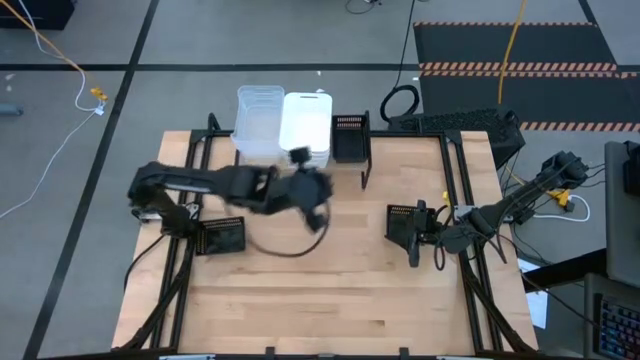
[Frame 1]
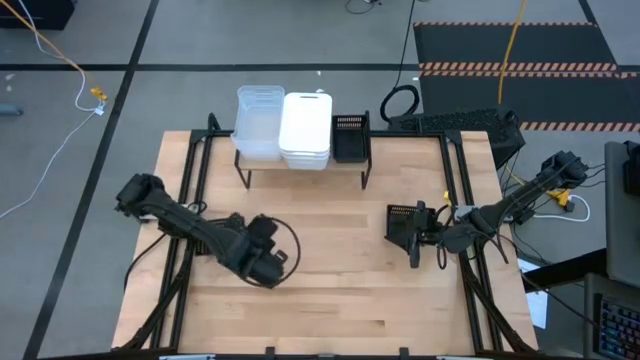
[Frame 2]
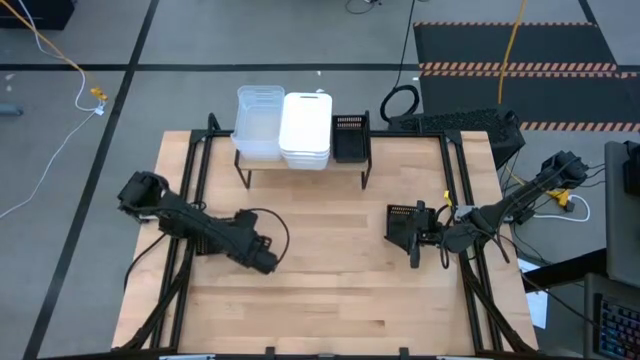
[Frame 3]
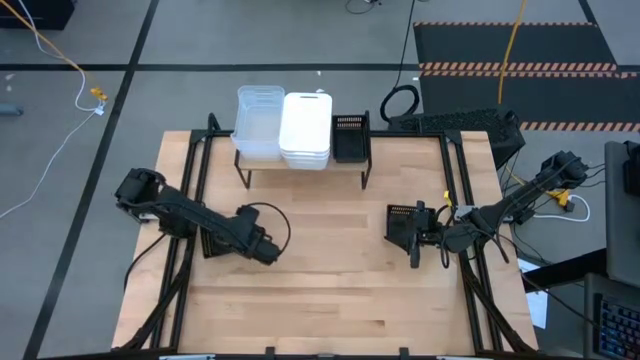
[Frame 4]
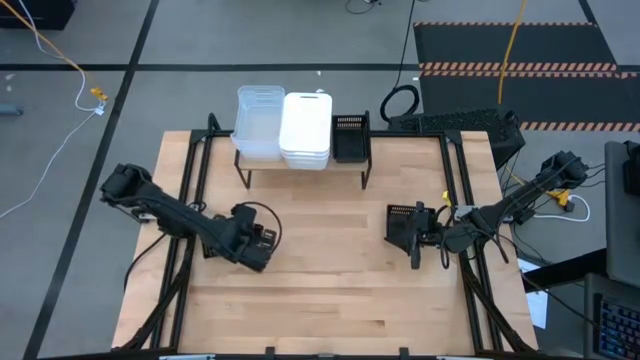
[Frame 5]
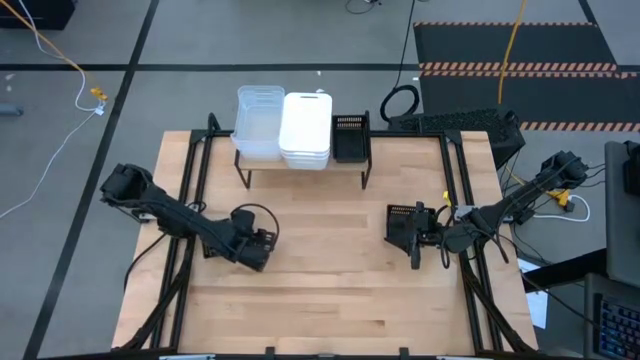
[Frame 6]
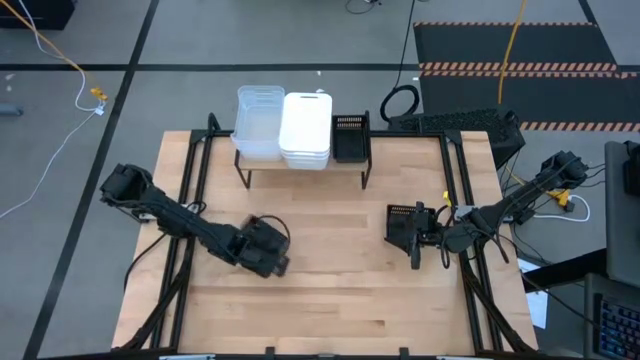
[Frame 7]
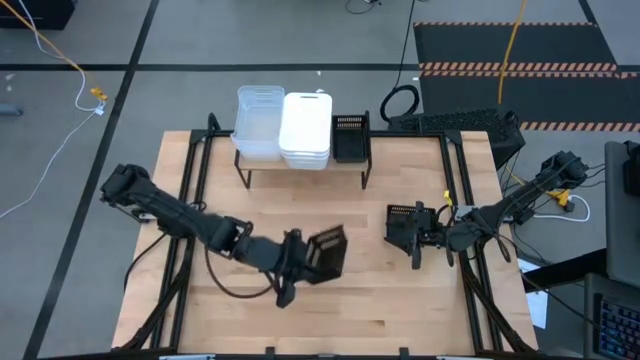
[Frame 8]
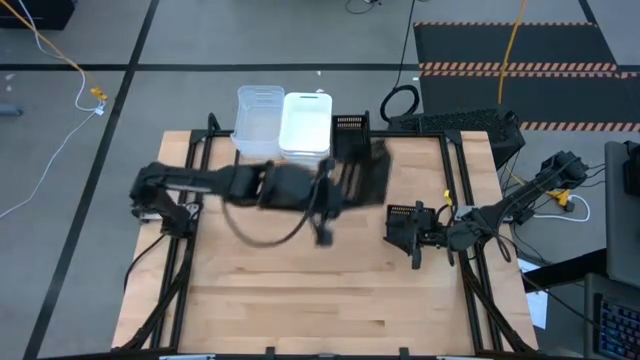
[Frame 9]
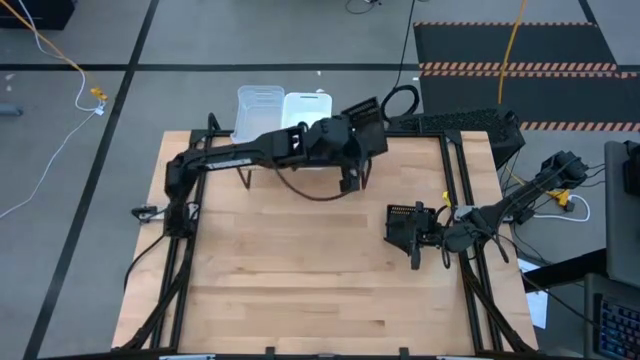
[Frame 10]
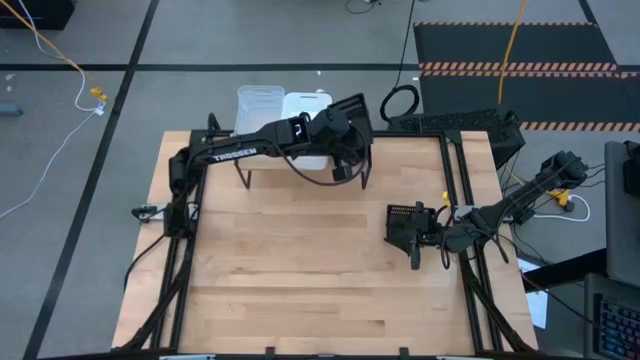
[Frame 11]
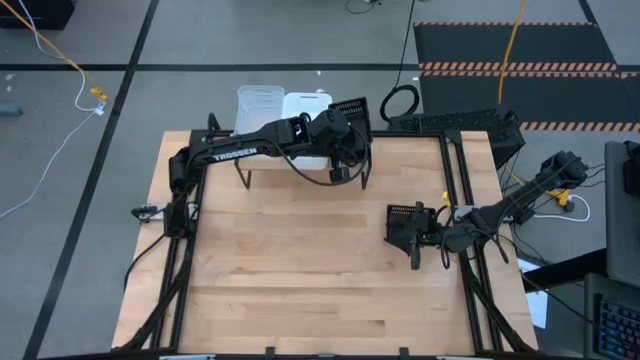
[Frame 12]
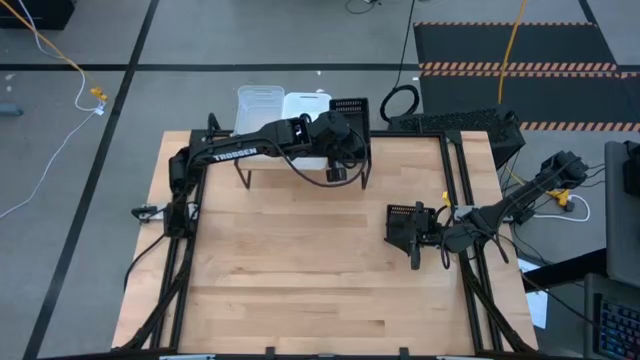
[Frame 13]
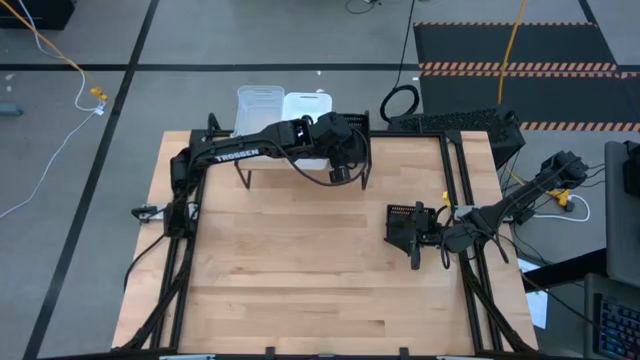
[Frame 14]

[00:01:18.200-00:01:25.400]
Task: Stack baskets on shelf by color
Stack the left black bin on top of the black bin on the shelf

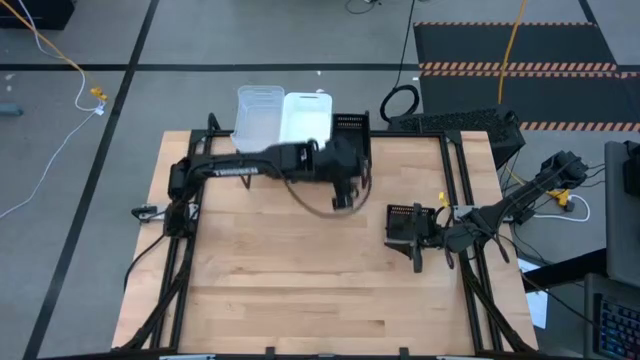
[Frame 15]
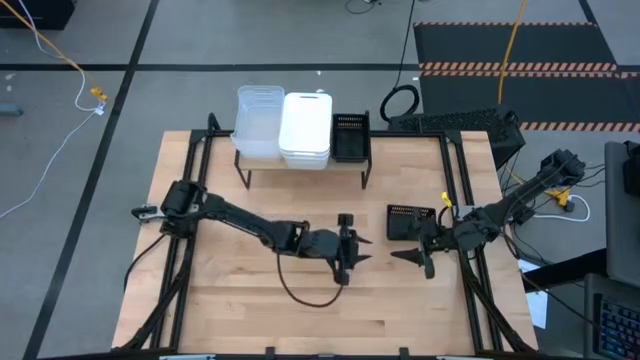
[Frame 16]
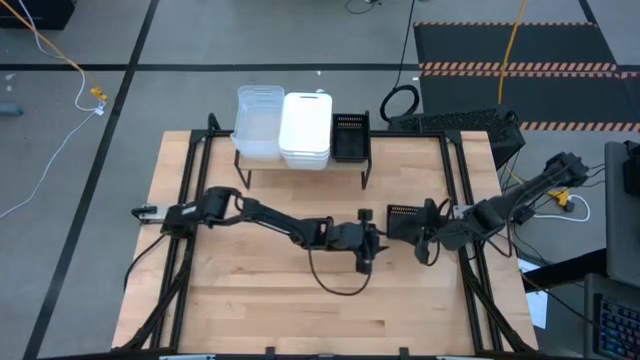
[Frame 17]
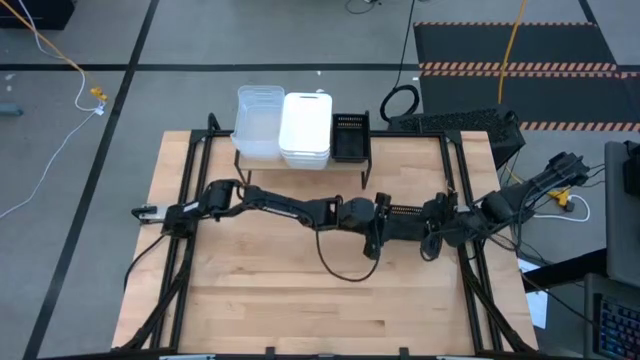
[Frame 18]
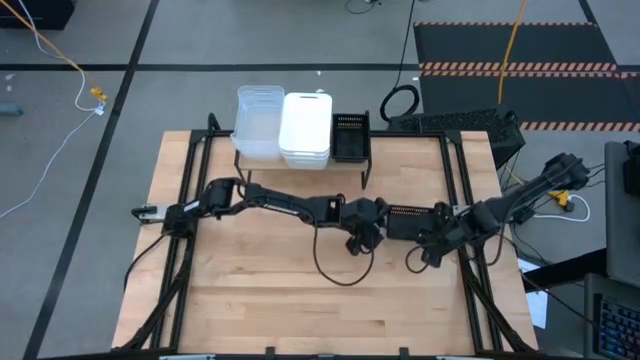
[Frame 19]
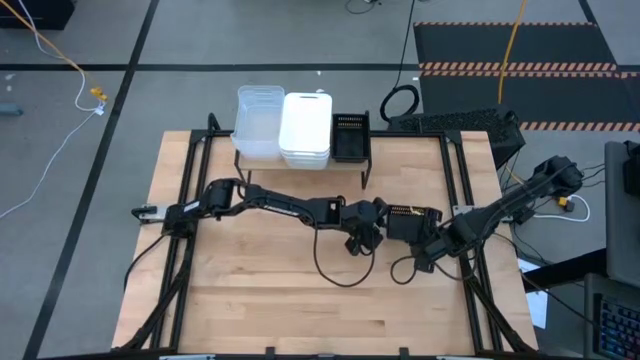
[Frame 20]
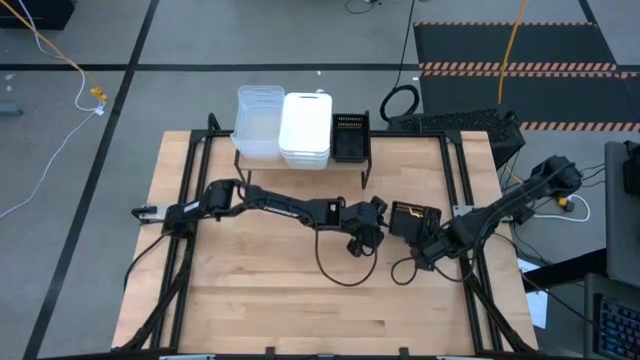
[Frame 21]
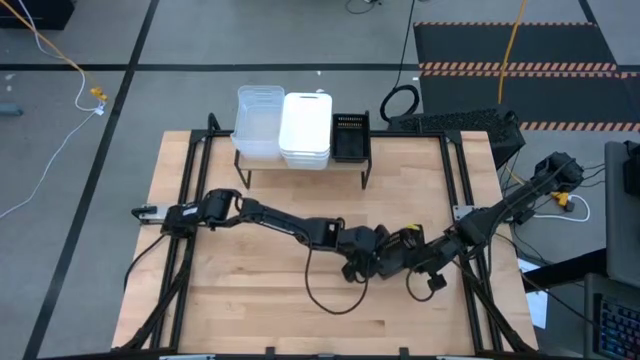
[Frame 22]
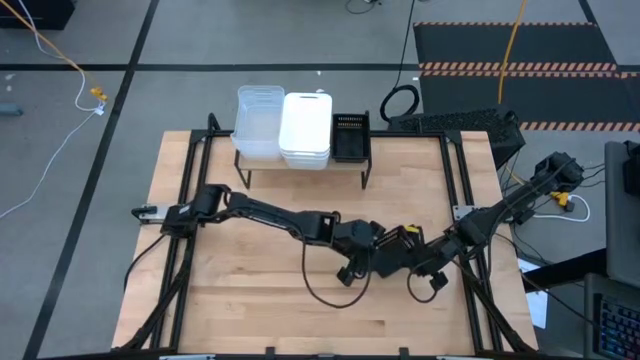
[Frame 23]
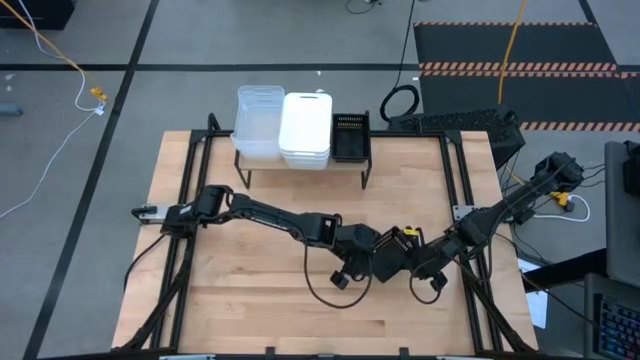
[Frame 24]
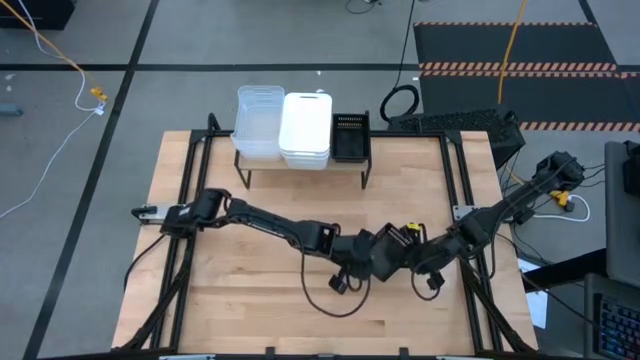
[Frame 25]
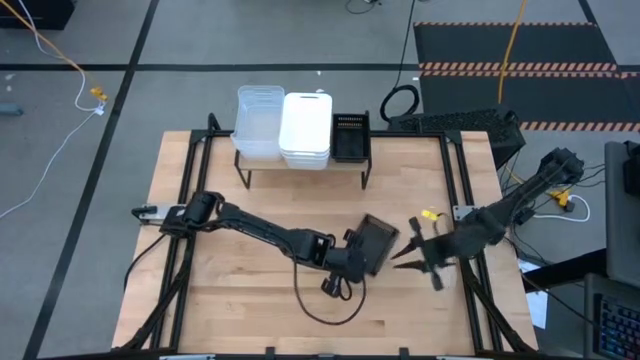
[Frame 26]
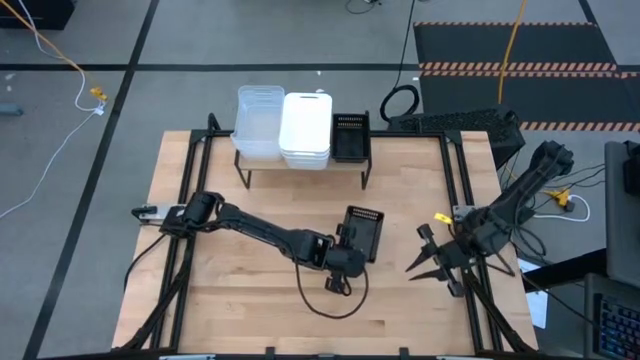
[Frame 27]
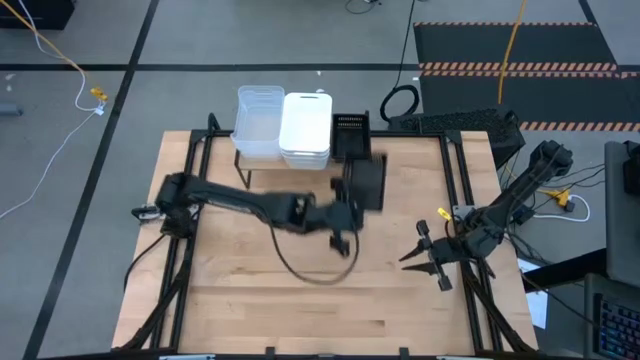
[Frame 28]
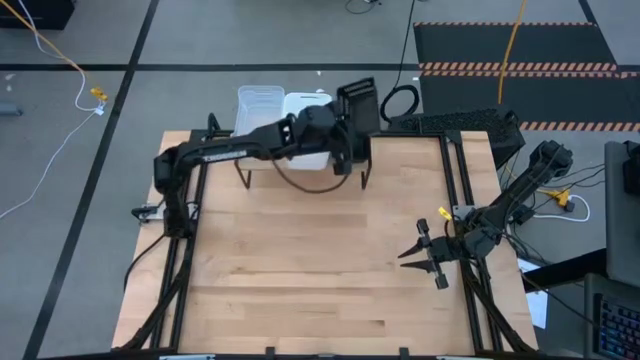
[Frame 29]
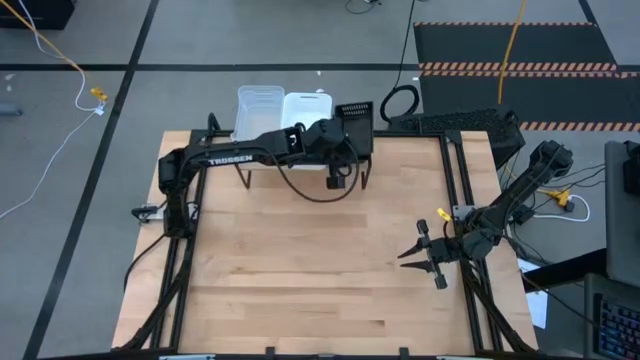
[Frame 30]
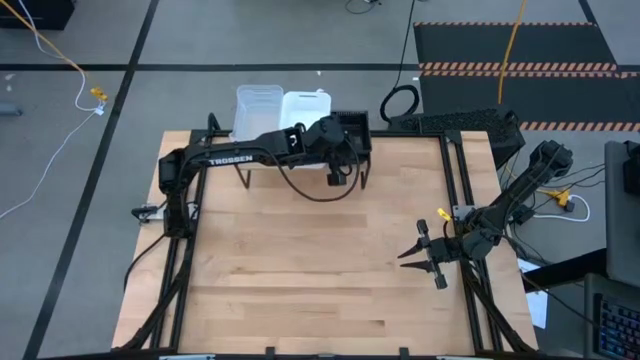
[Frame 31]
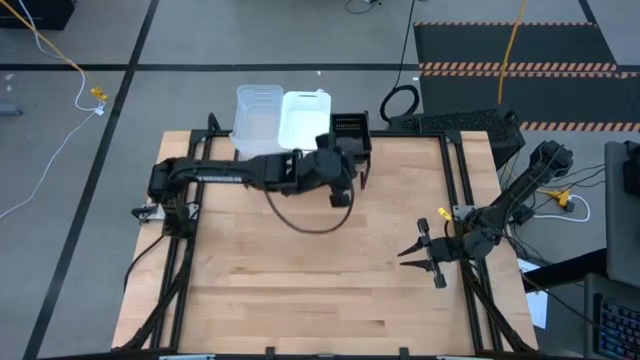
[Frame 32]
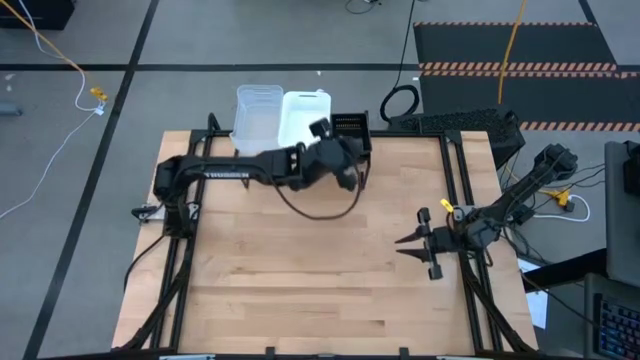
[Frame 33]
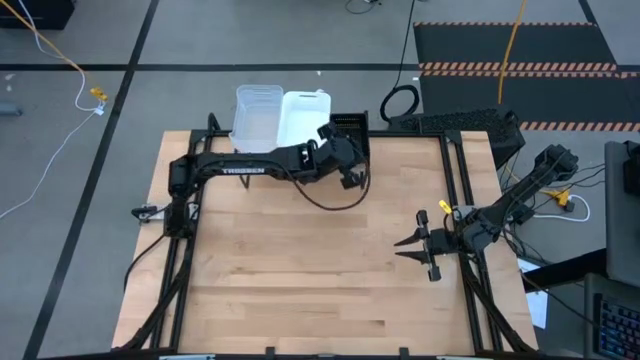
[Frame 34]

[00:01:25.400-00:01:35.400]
Stack the black bin on top of the black bin on the shelf

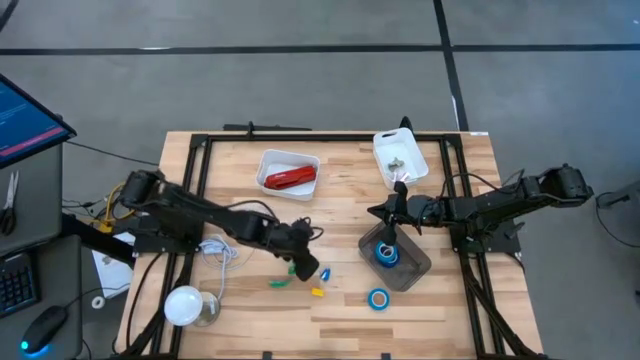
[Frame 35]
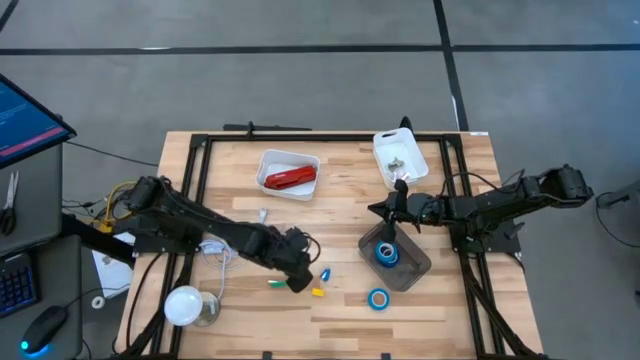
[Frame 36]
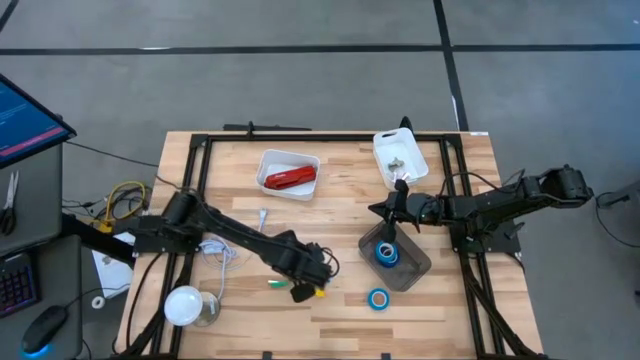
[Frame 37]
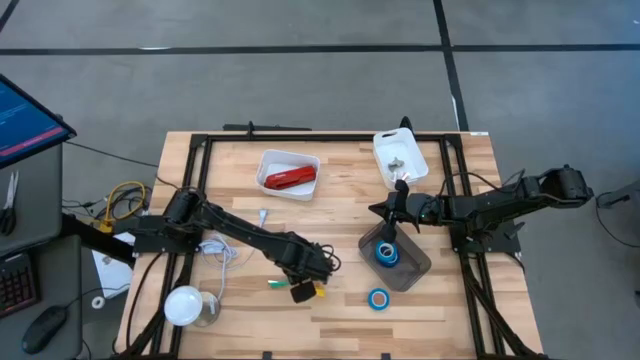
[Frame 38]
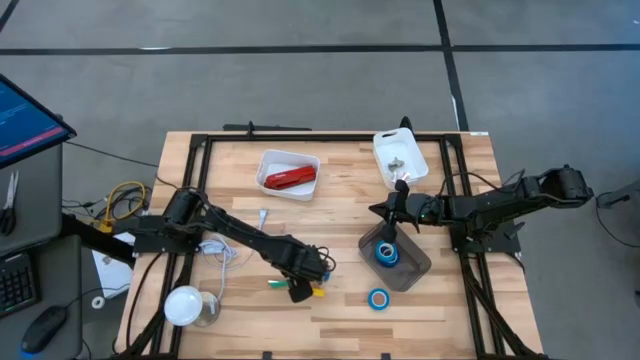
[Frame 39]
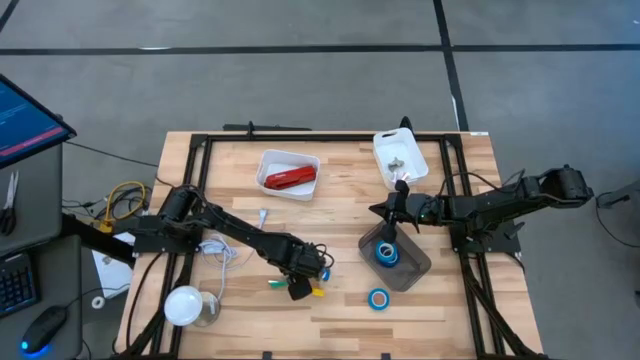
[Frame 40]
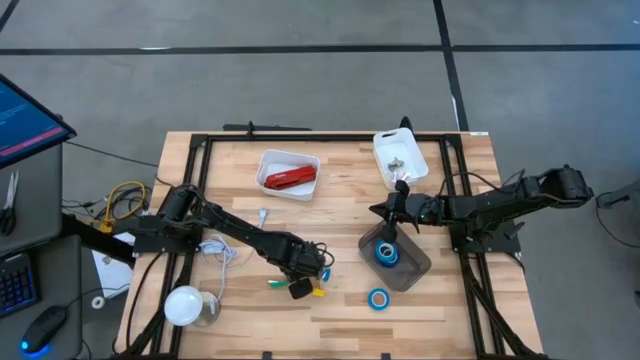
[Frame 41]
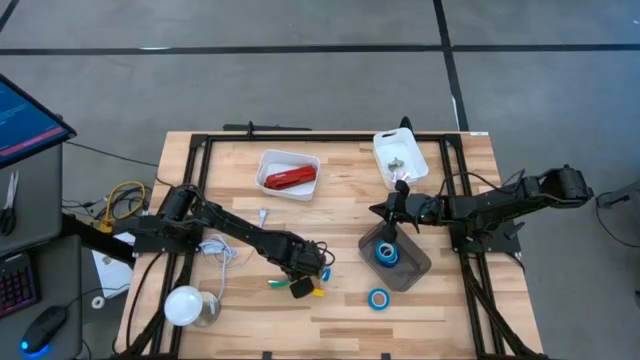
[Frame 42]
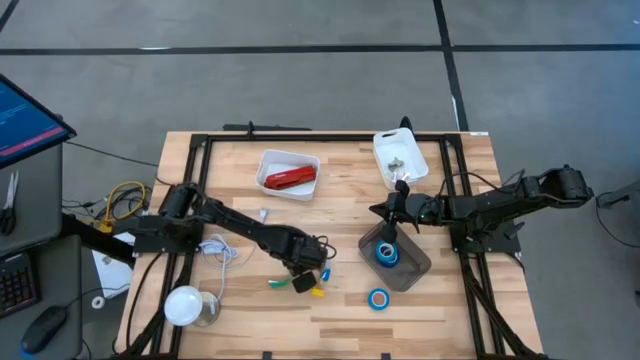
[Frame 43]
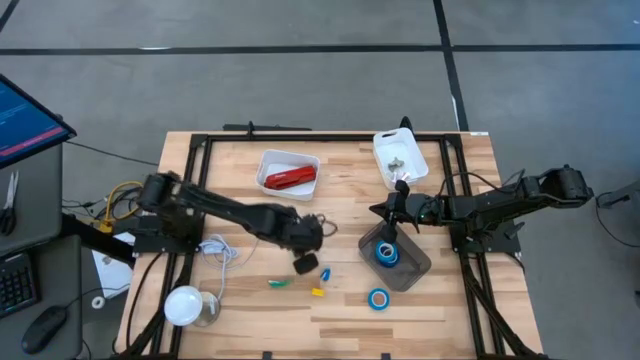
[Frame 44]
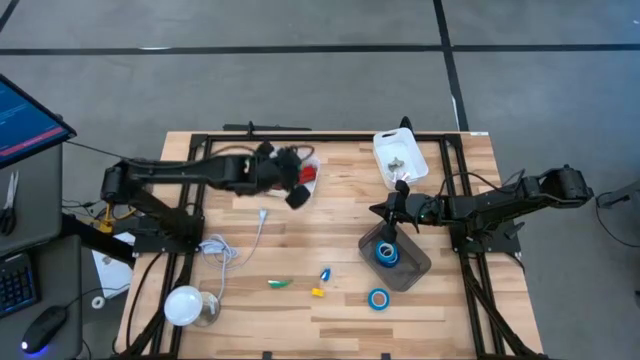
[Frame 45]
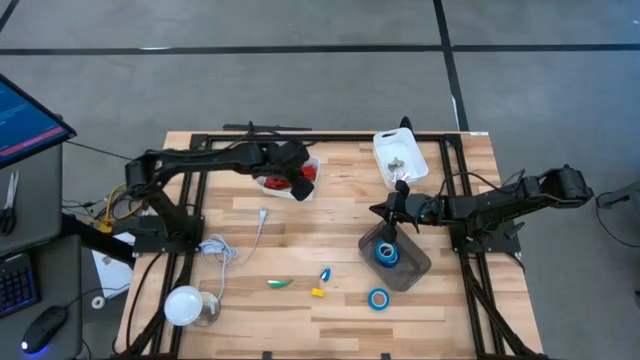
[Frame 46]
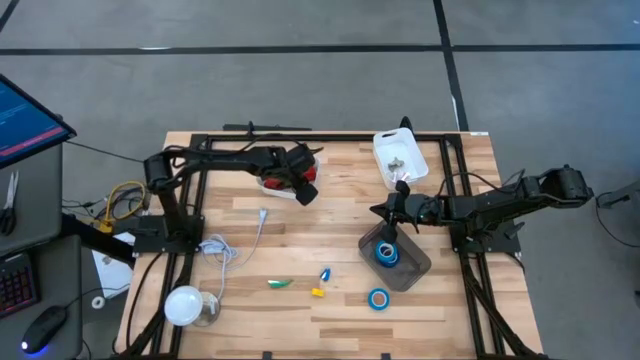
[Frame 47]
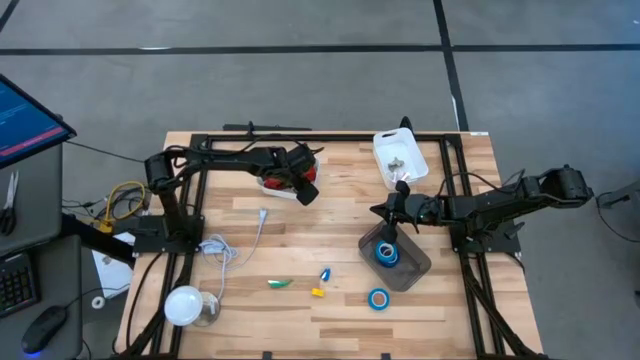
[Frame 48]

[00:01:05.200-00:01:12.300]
Task: Pick and place Stapler, Stapler remover, tape
Put the right green small stapler into the left white bin
